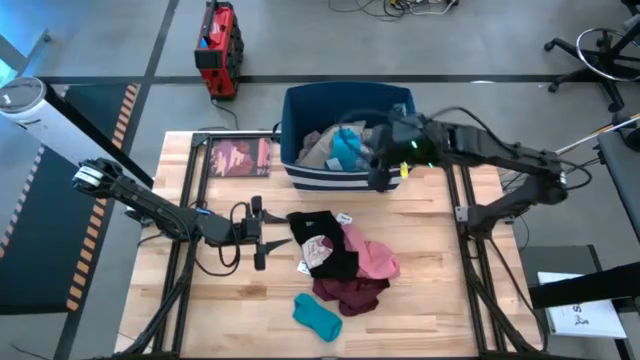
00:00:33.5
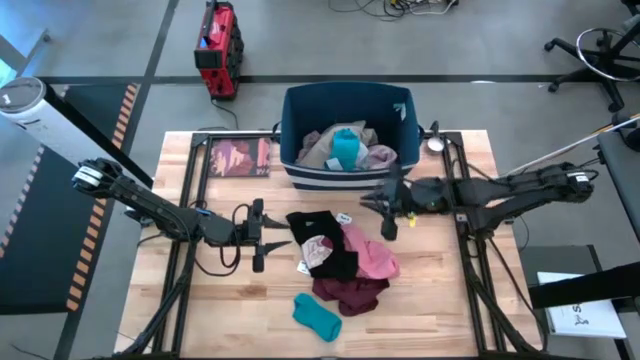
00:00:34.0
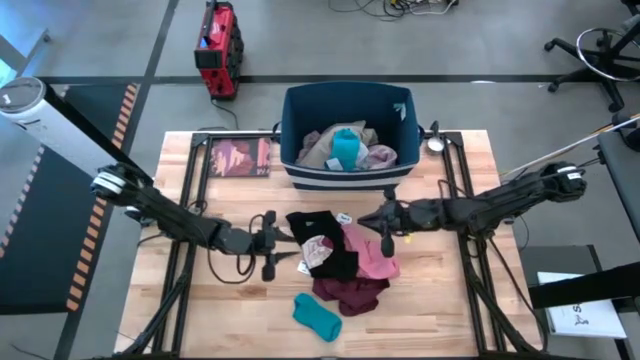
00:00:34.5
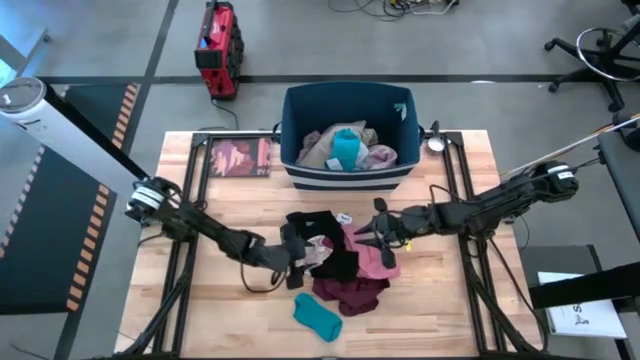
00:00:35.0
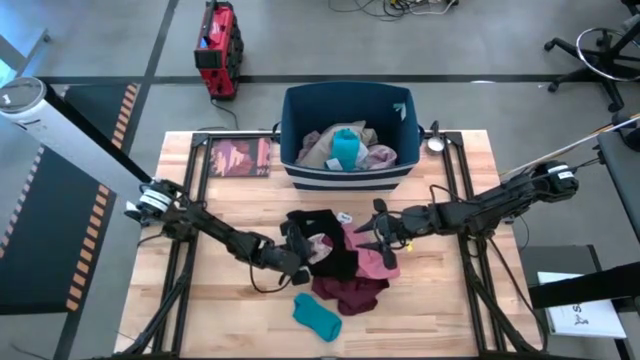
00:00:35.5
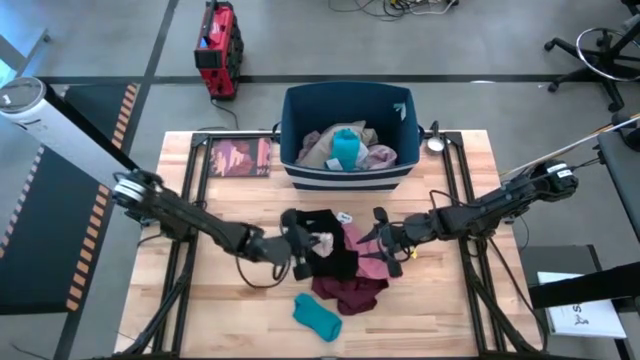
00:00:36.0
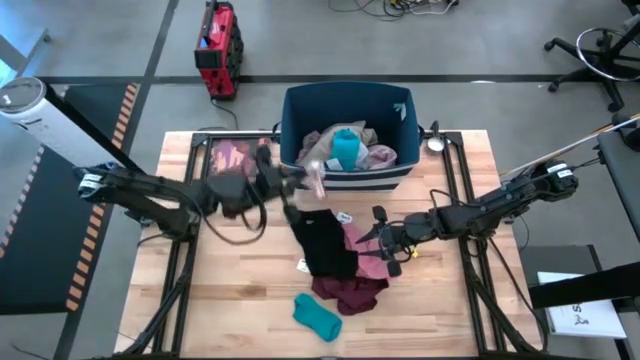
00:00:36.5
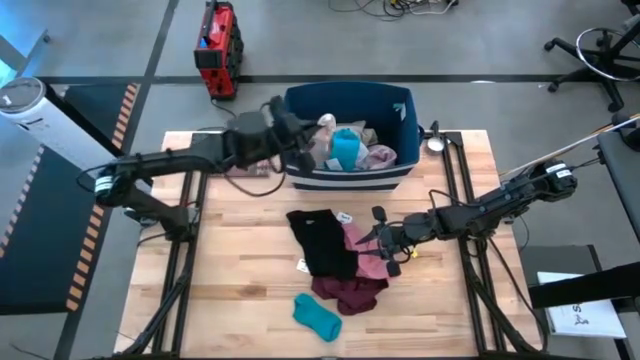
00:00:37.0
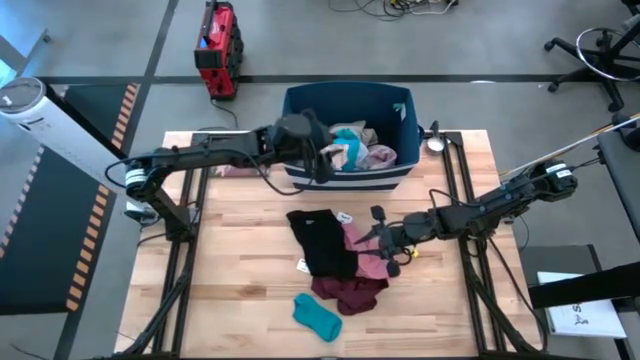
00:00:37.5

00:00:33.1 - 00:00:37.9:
Task: Sort clothes
Put the white sock into the blue bin

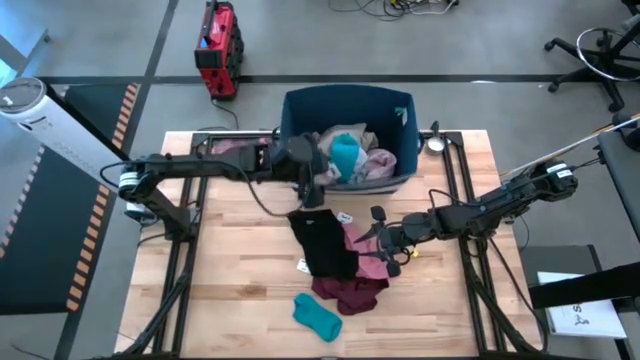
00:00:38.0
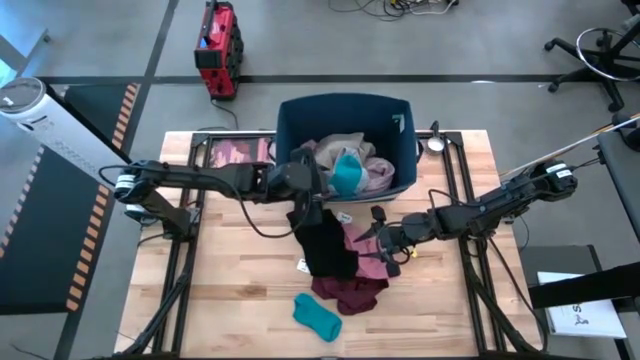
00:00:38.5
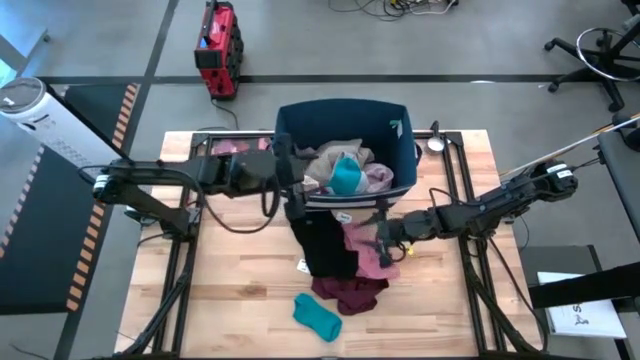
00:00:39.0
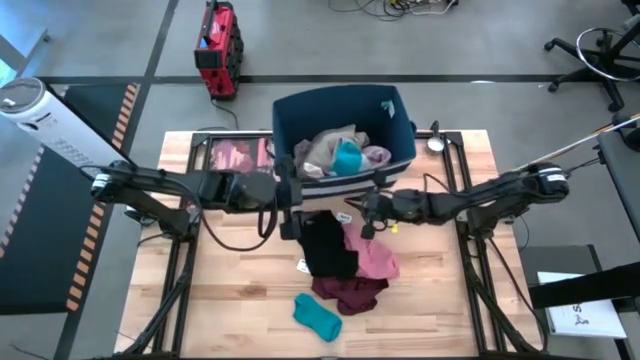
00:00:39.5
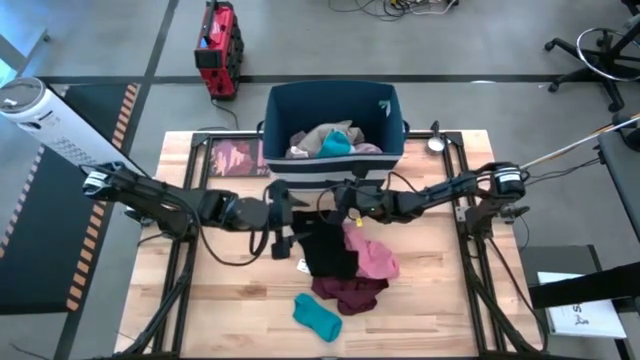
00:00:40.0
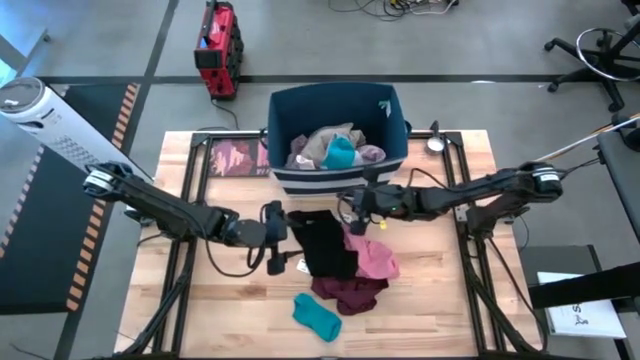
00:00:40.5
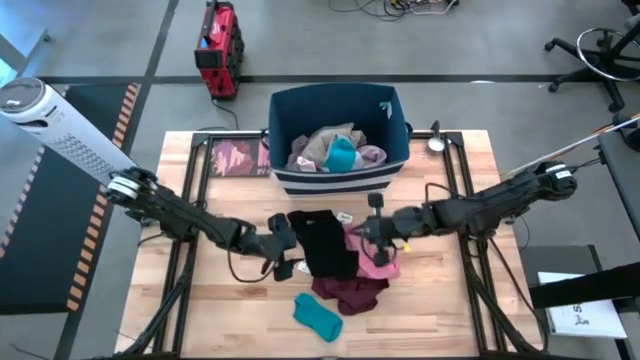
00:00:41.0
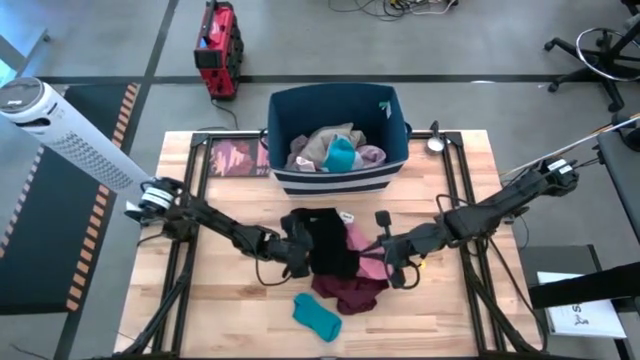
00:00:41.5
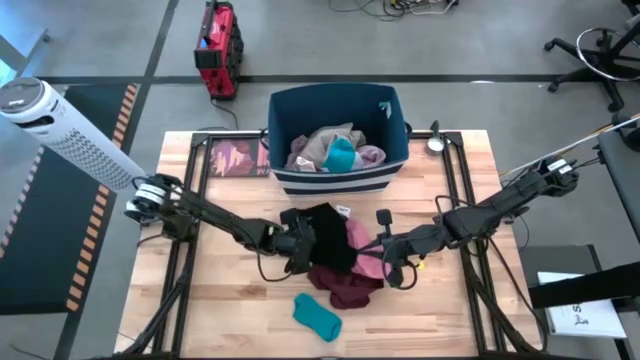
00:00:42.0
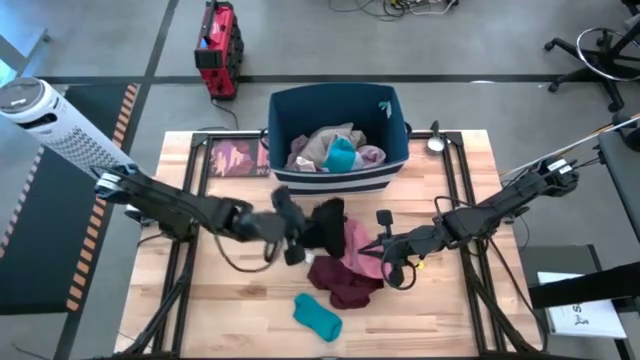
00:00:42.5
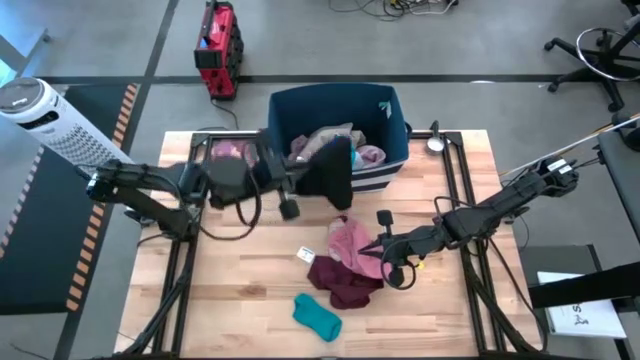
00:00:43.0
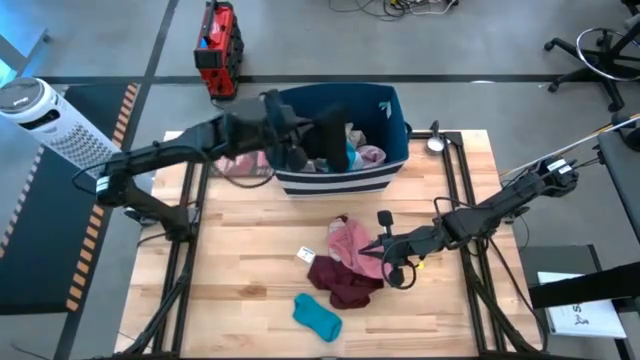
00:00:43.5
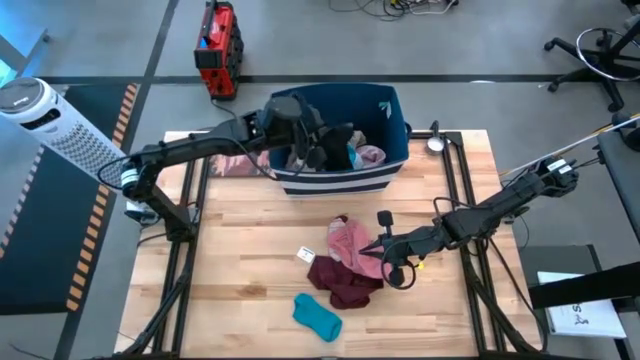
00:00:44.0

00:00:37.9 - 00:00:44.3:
Put the black shorts into the blue bin

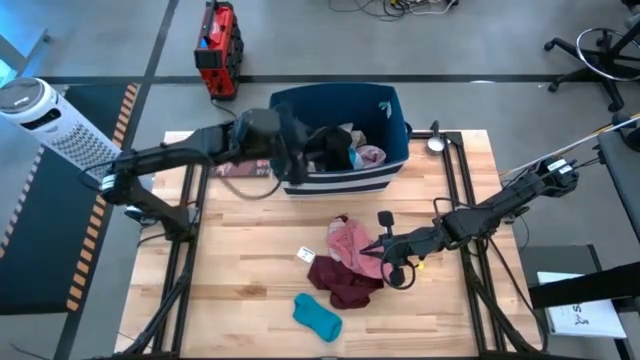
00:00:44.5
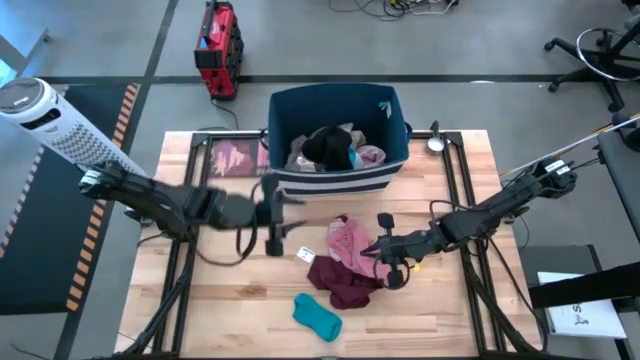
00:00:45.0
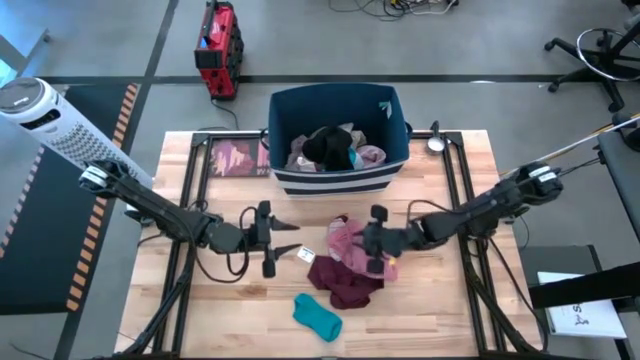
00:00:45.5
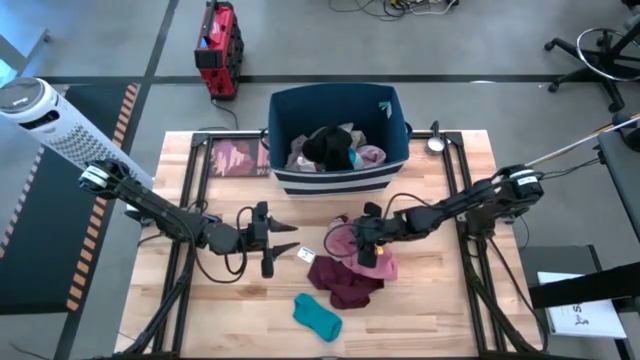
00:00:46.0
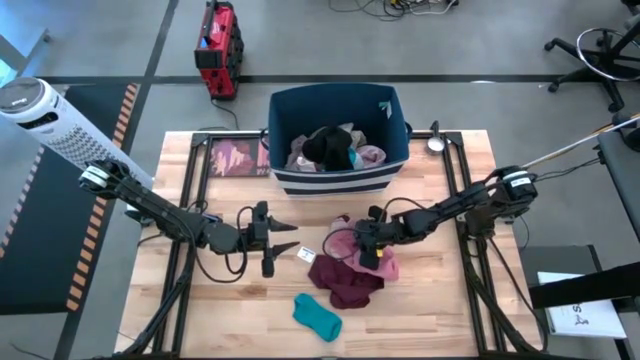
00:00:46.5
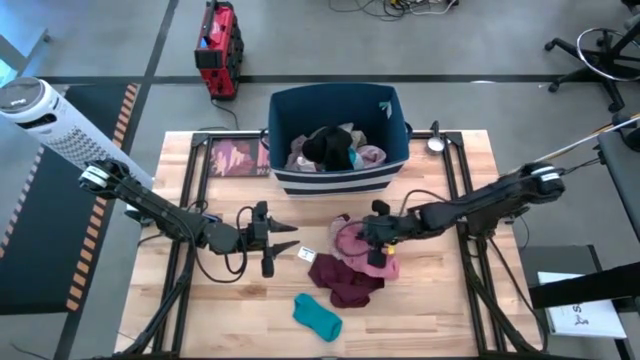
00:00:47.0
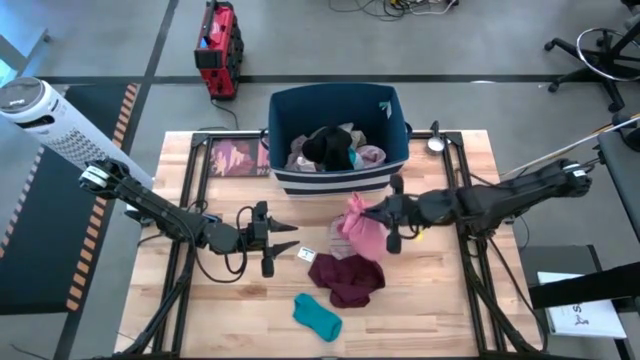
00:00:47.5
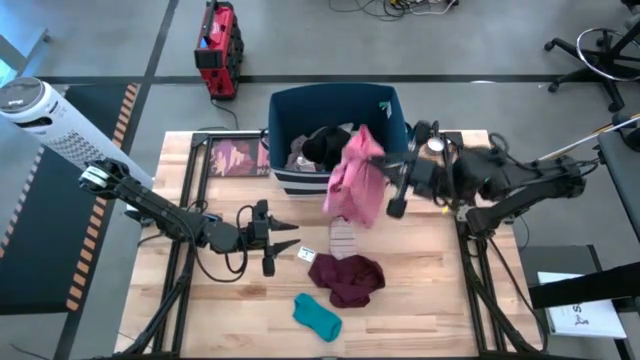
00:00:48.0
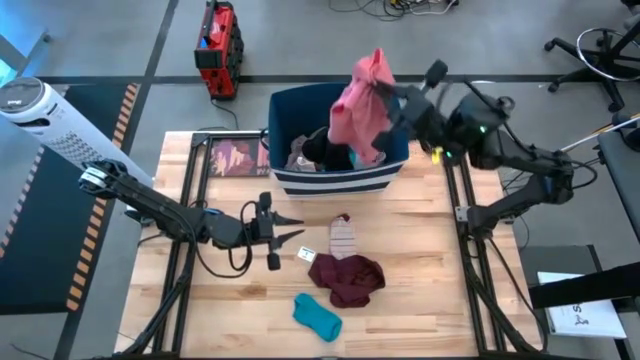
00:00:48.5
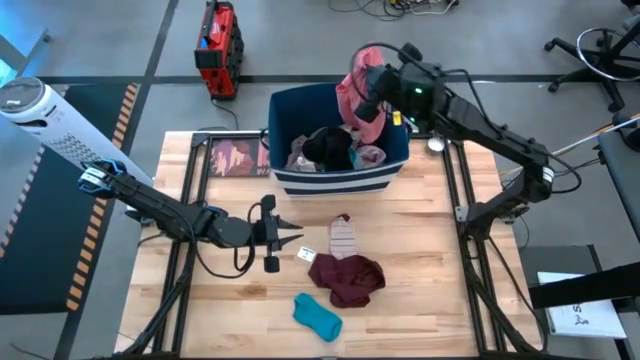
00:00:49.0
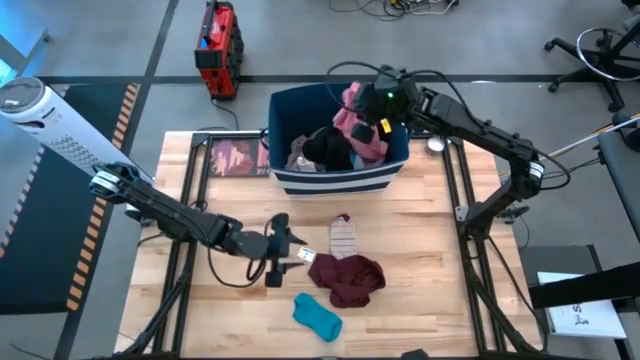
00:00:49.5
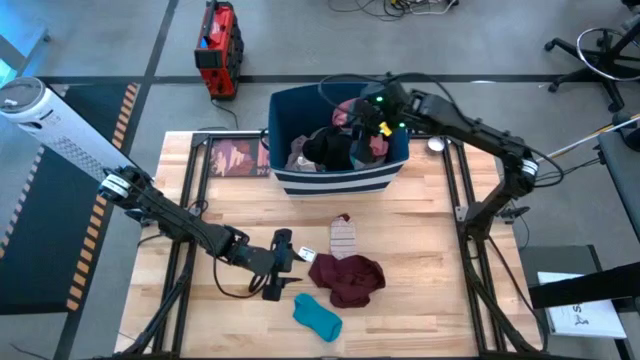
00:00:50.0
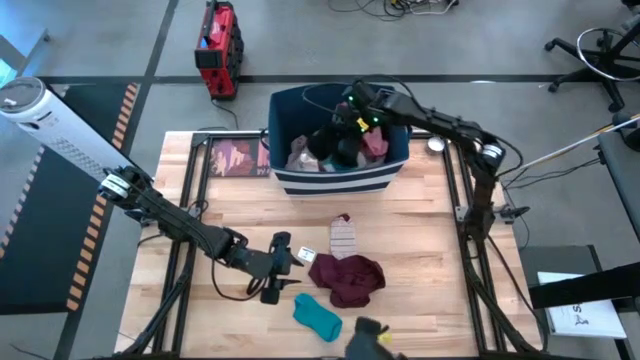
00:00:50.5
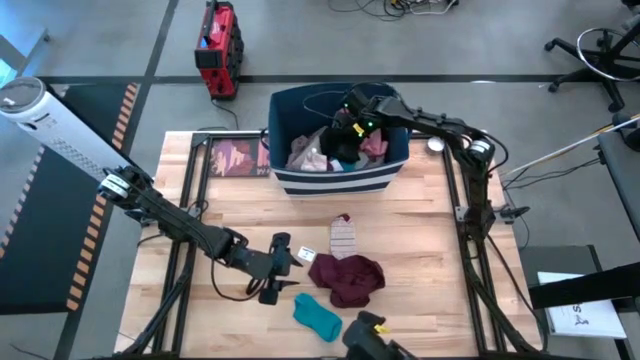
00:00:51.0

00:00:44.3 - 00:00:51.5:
Put the pink shirt into the blue bin

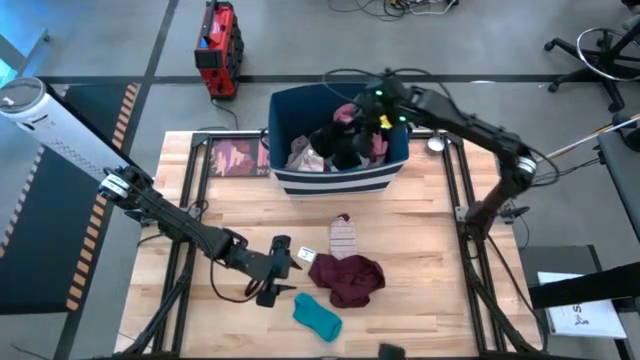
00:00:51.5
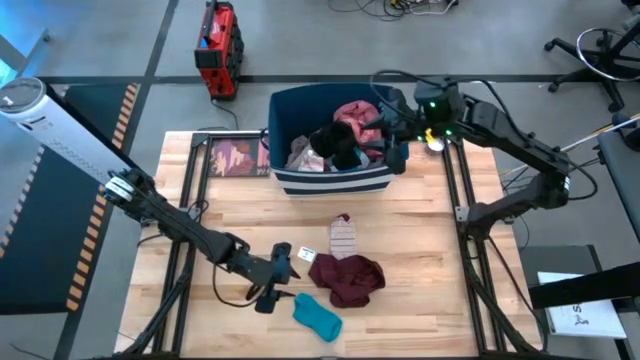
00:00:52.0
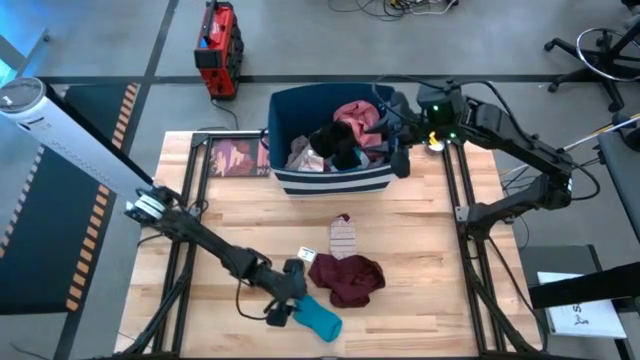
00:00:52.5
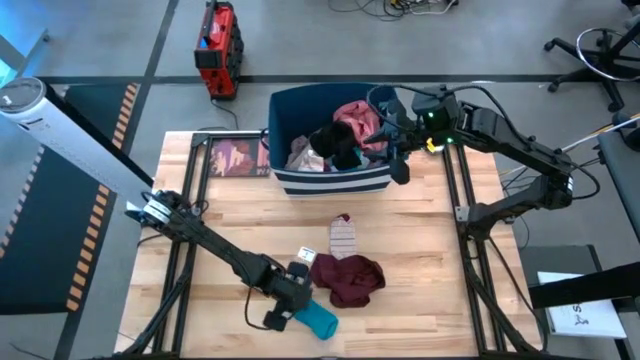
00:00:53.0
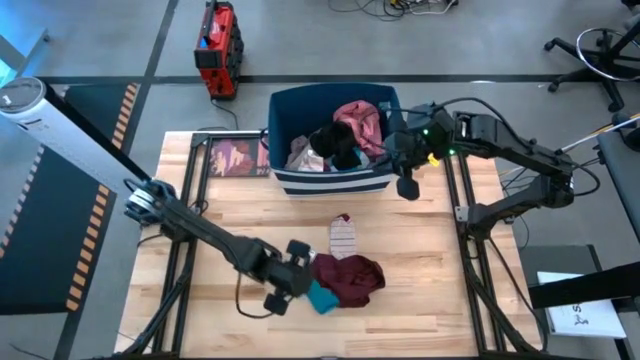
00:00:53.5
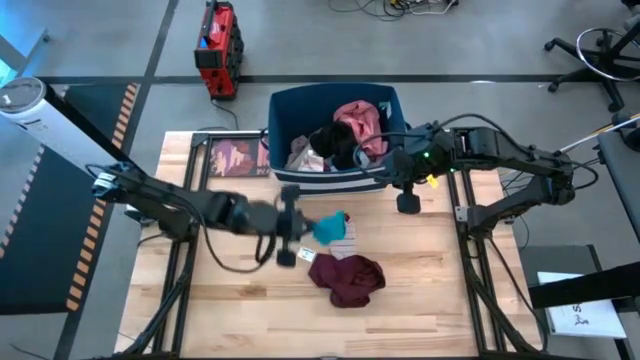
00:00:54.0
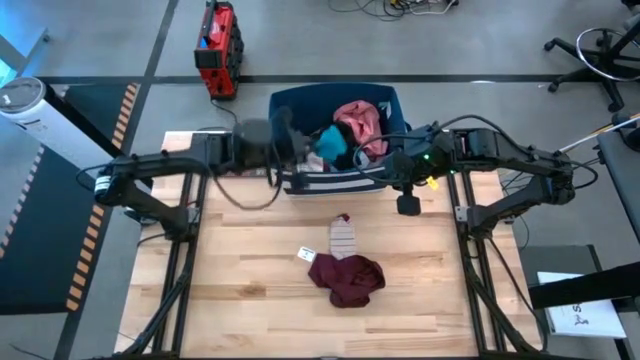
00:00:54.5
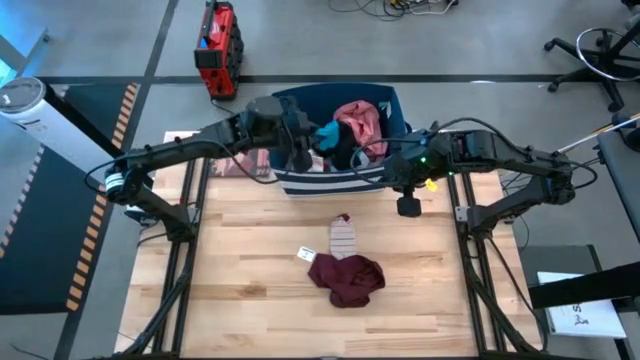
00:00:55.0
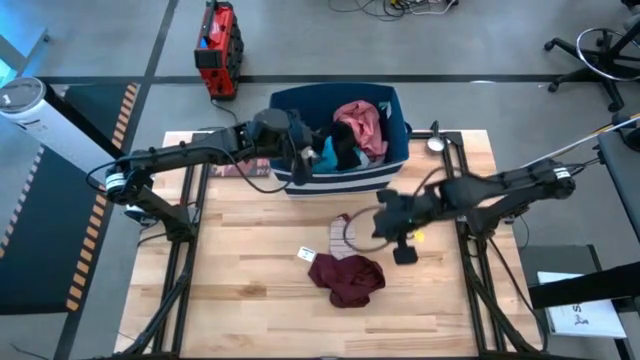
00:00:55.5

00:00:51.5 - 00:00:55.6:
Put the blue sock into the blue bin
